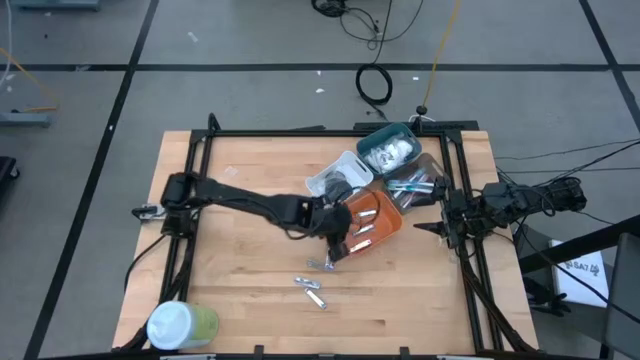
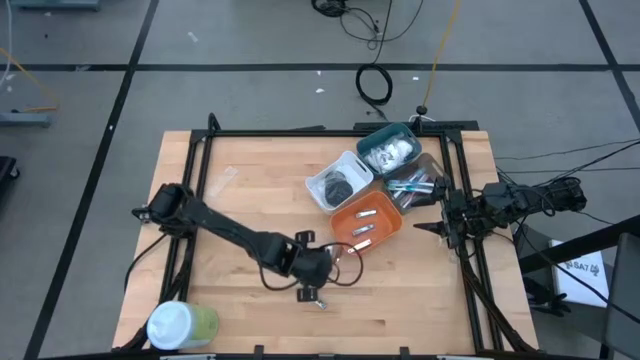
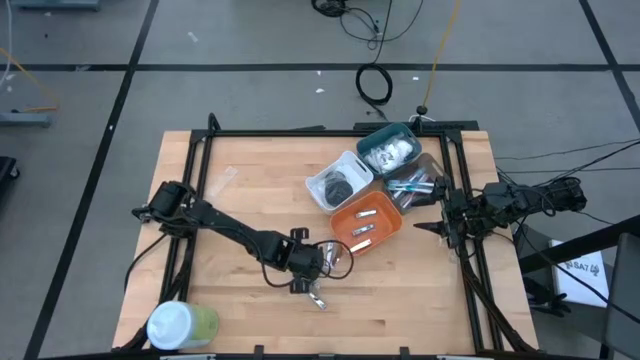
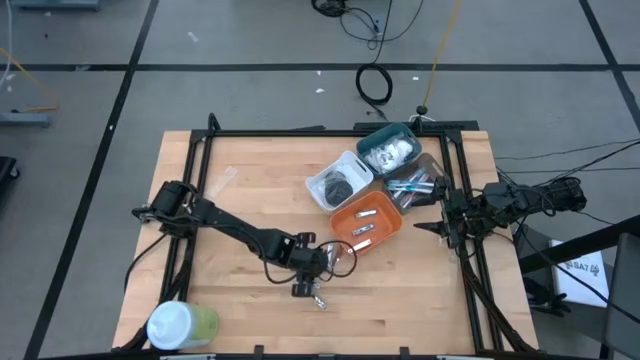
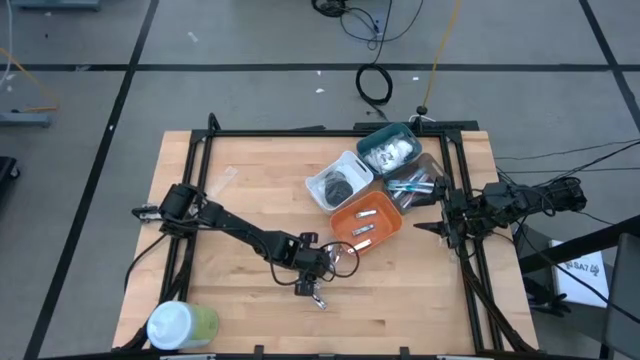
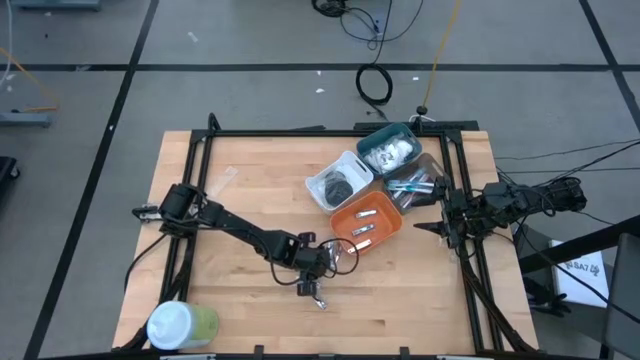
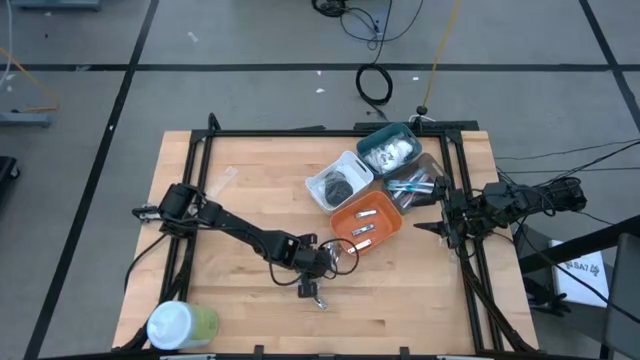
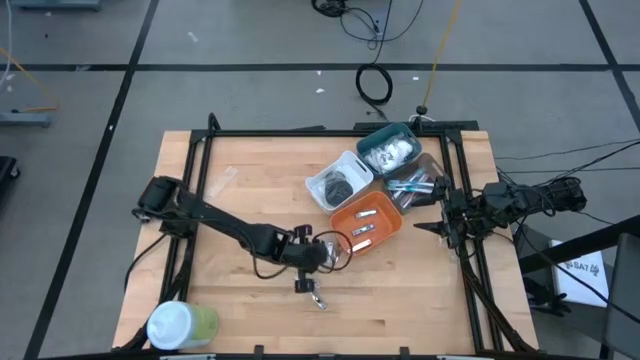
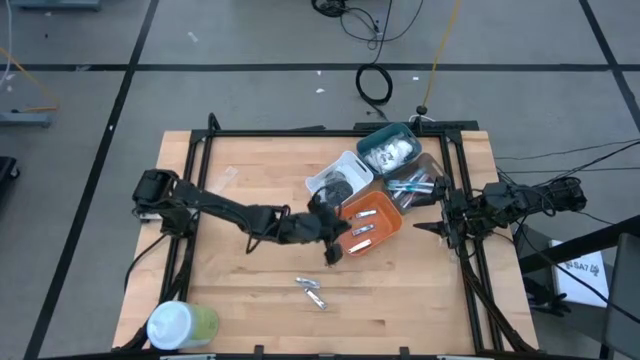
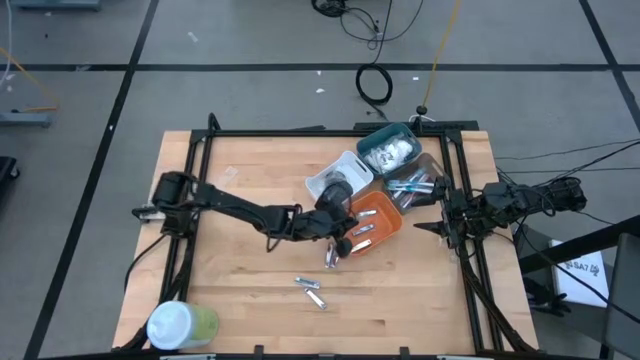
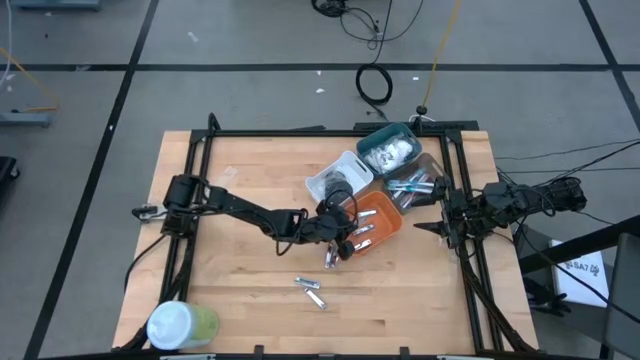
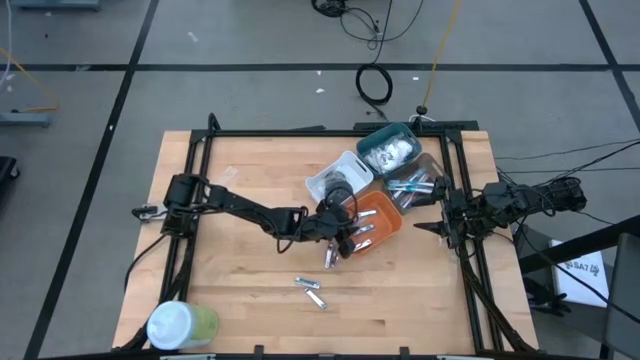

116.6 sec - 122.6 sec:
Task: Pick & Place Travel size toiletries
Put the silver nail cutter into the orange bin

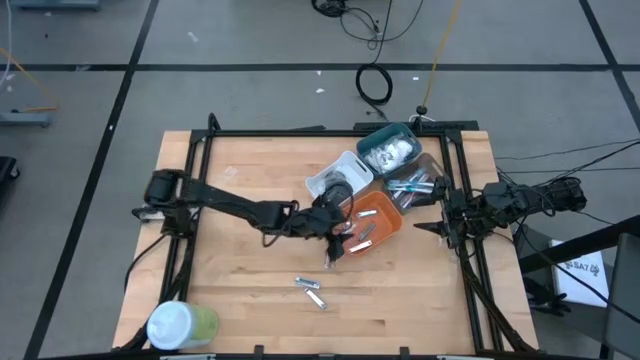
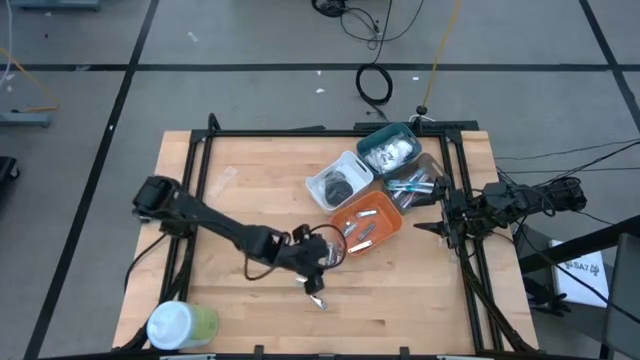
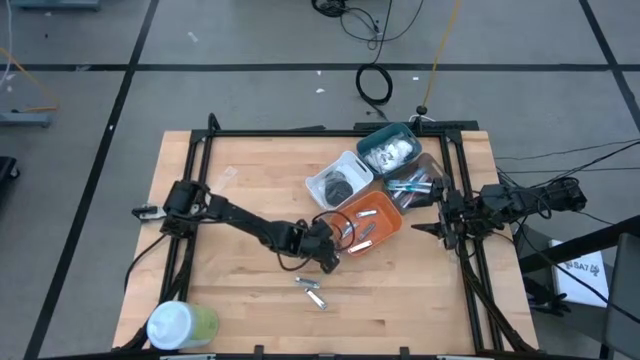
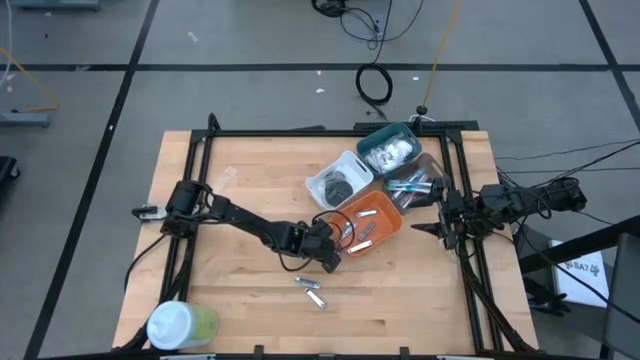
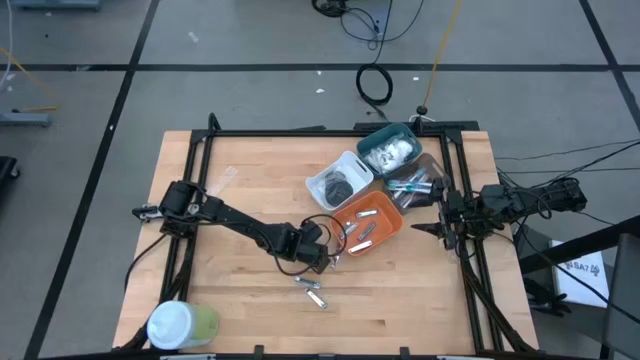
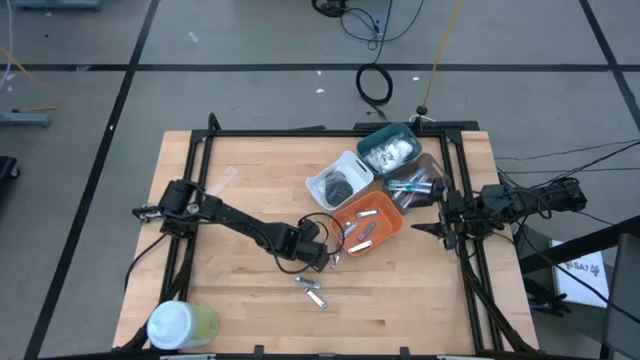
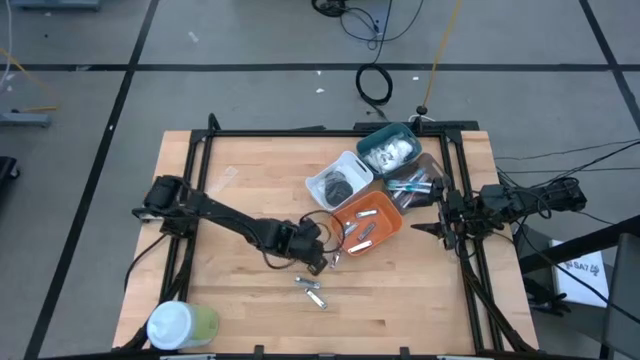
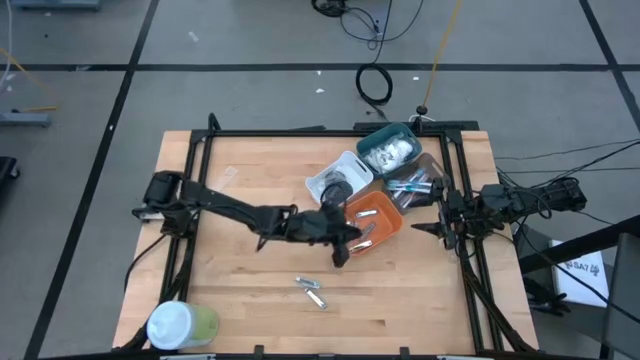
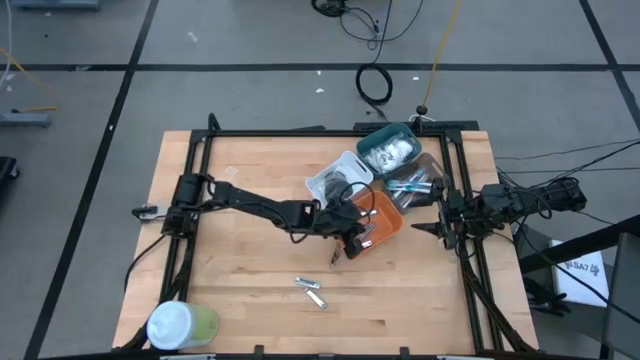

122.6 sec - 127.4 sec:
Put the silver nail cutter into the orange bin

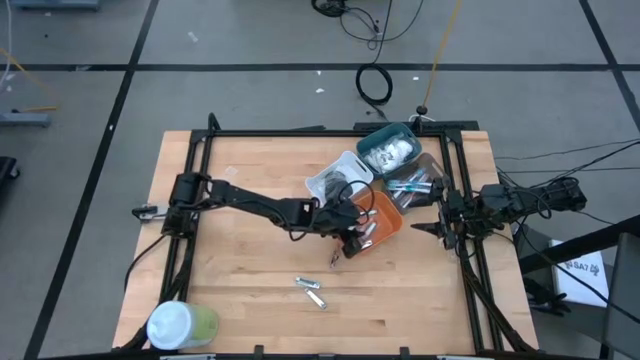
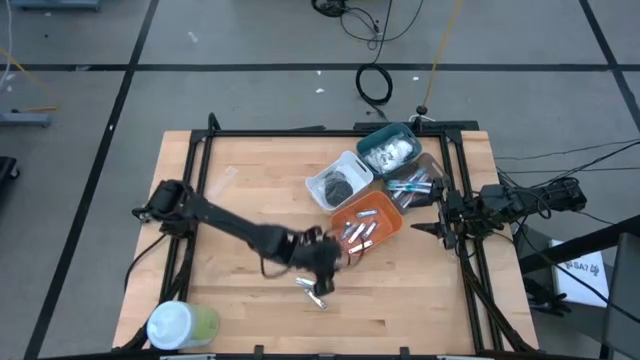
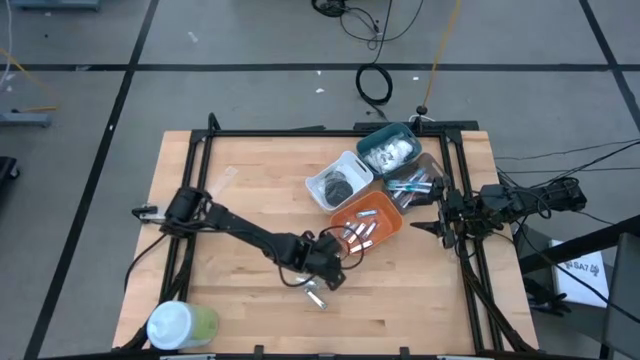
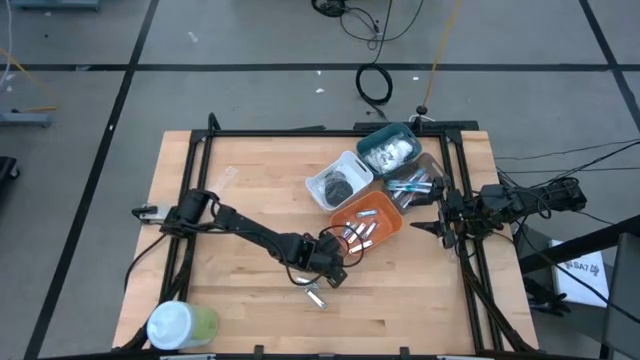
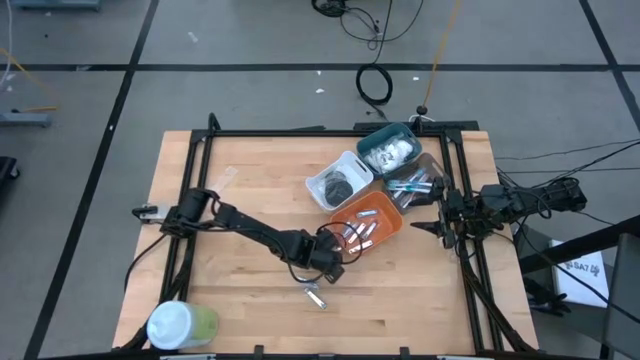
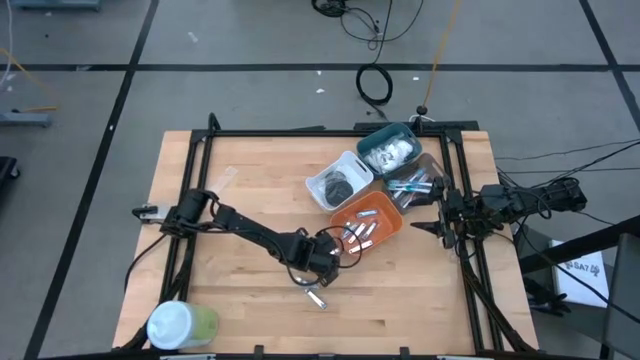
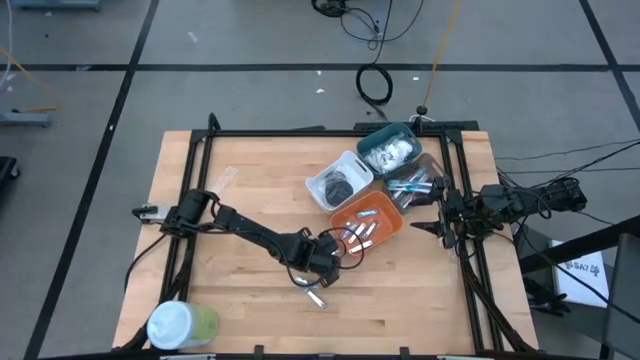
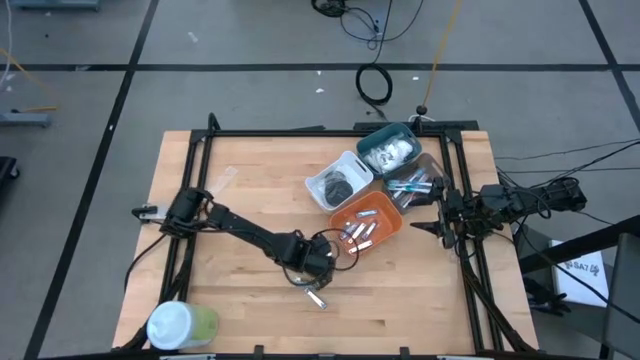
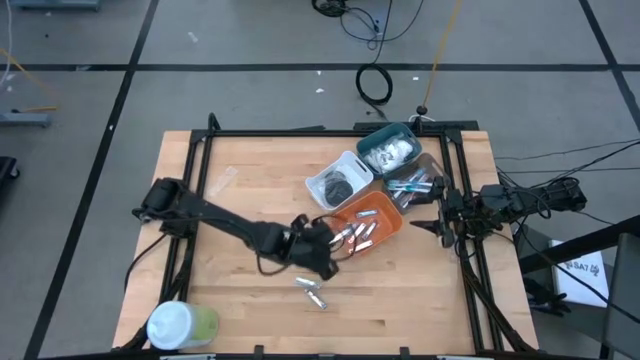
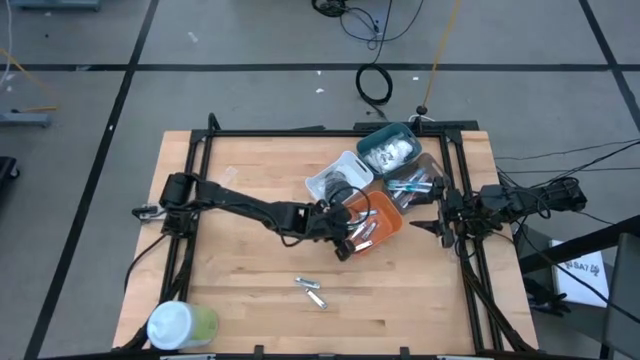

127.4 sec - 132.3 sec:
Put the silver nail cutter into the orange bin

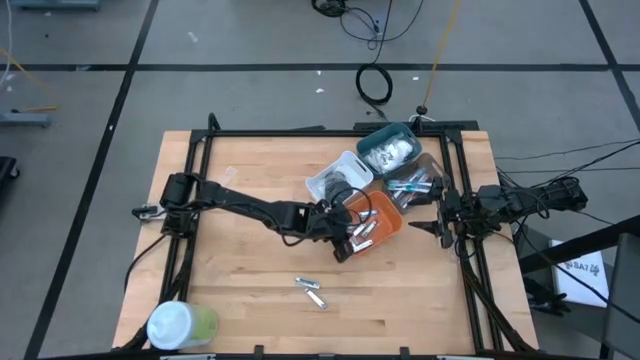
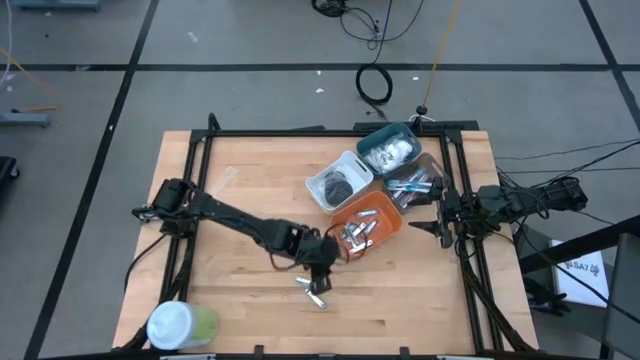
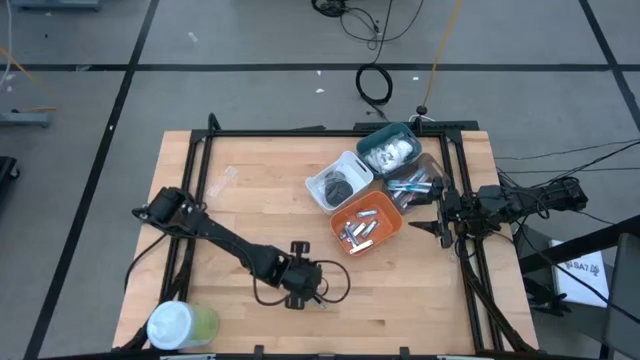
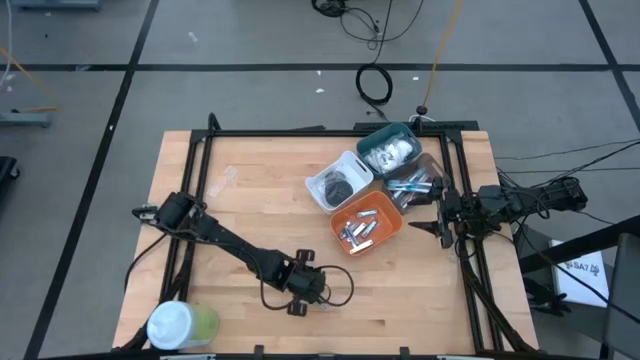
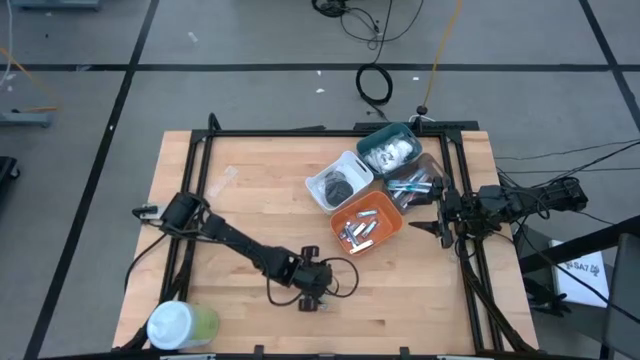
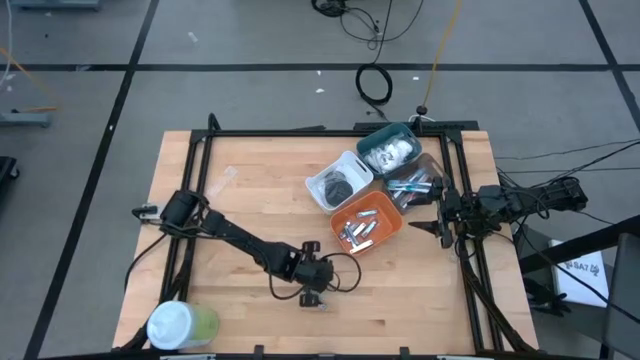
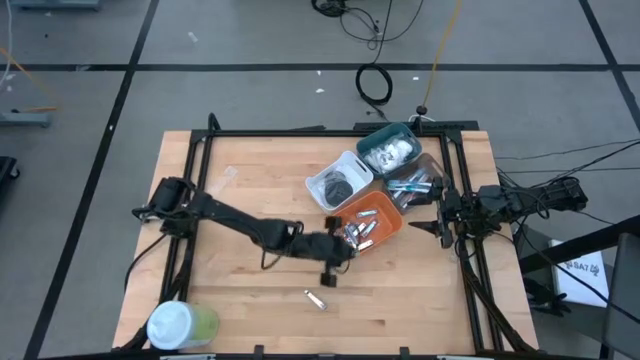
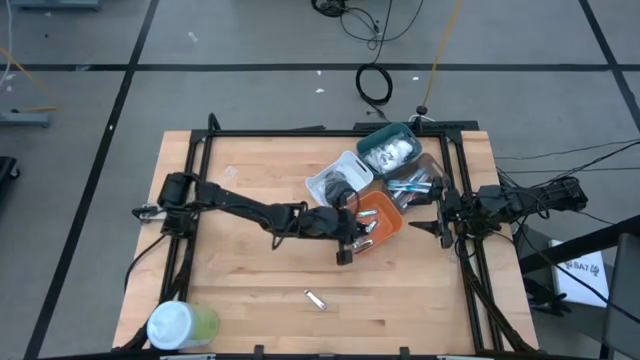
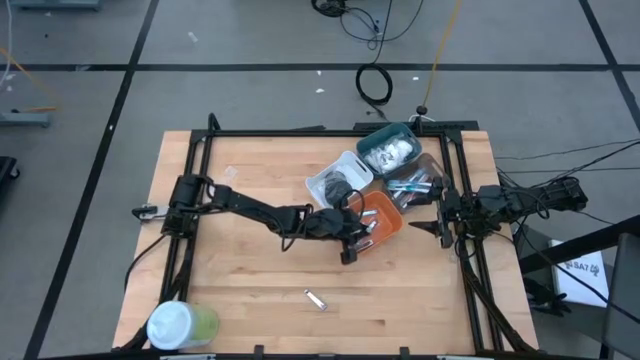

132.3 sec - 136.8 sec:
Put the silver nail cutter into the orange bin

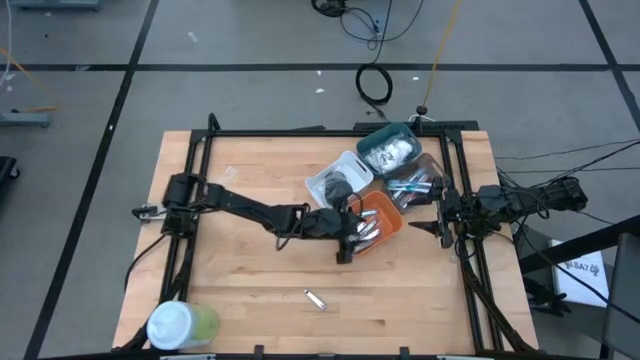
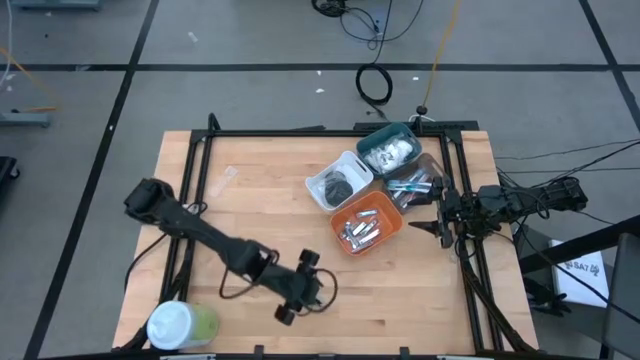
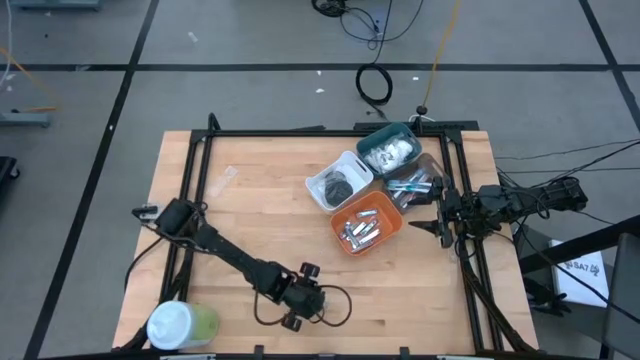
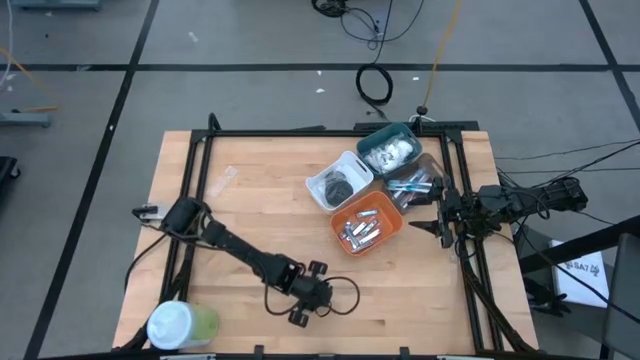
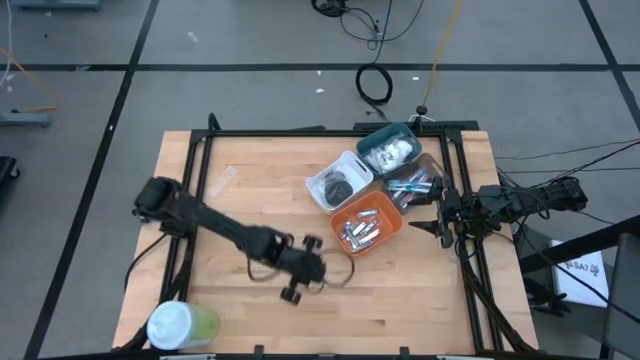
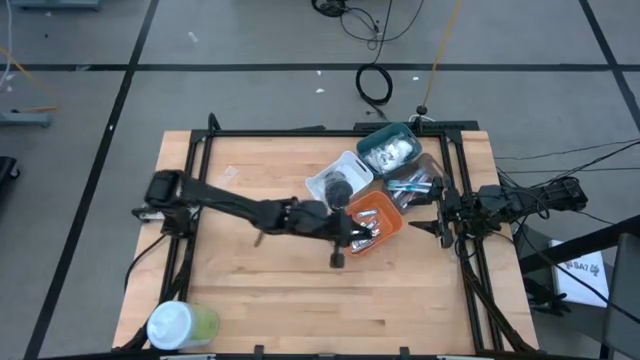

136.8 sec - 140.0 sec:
Put the silver nail cutter into the orange bin
